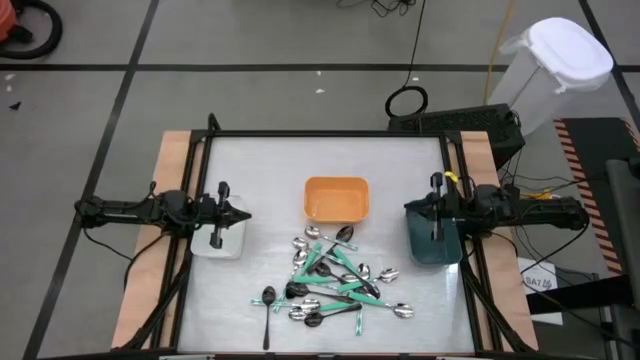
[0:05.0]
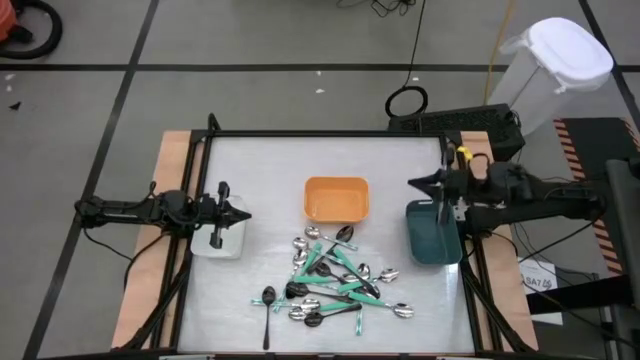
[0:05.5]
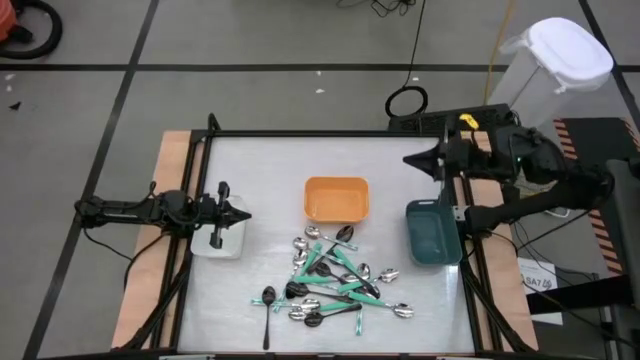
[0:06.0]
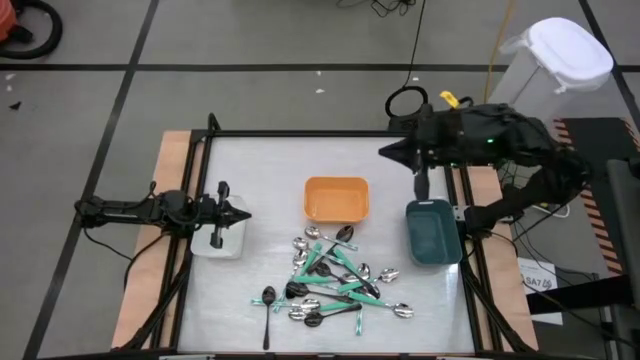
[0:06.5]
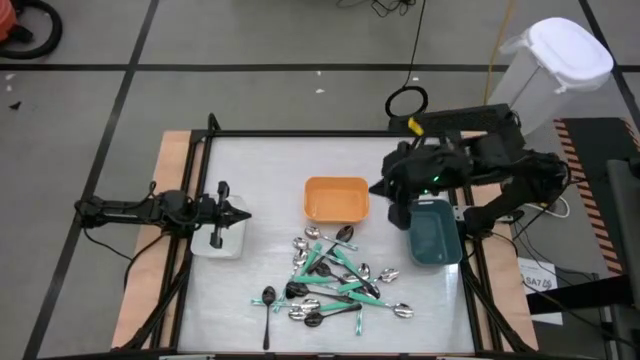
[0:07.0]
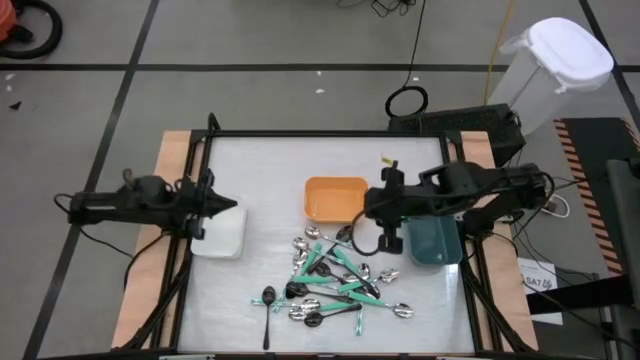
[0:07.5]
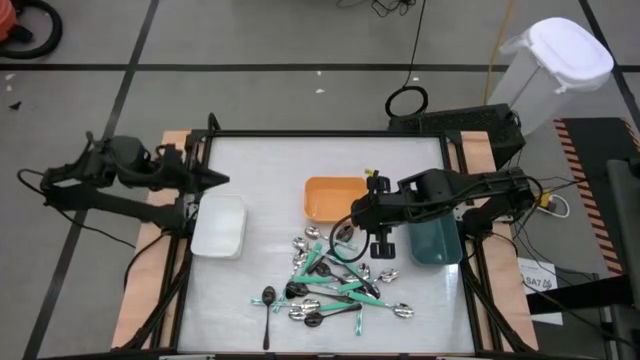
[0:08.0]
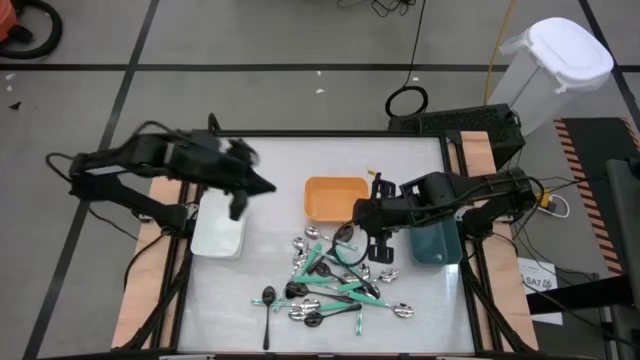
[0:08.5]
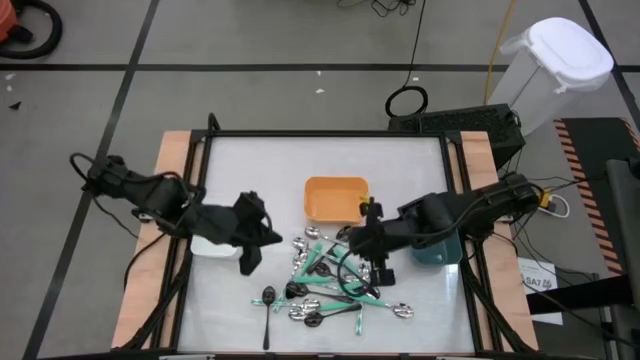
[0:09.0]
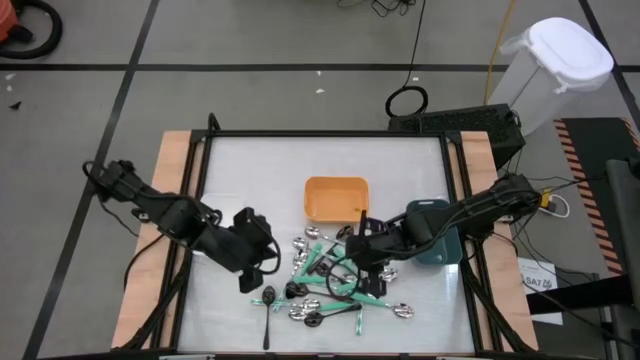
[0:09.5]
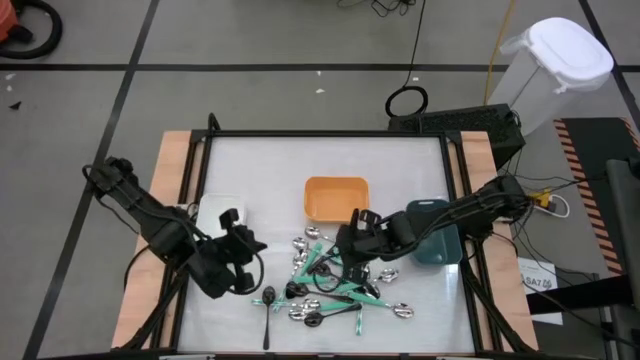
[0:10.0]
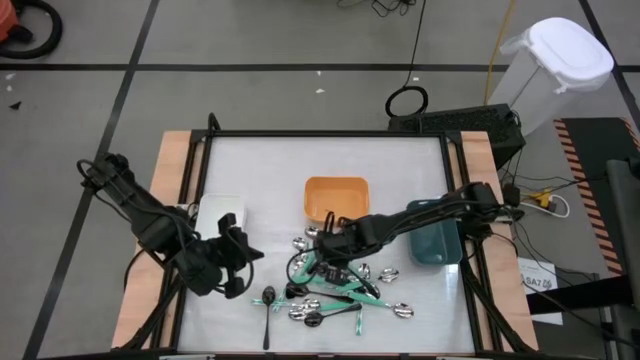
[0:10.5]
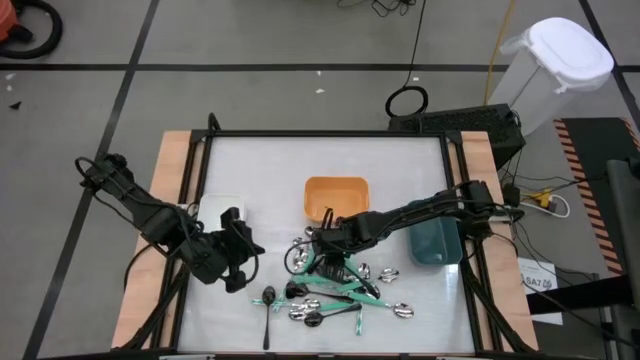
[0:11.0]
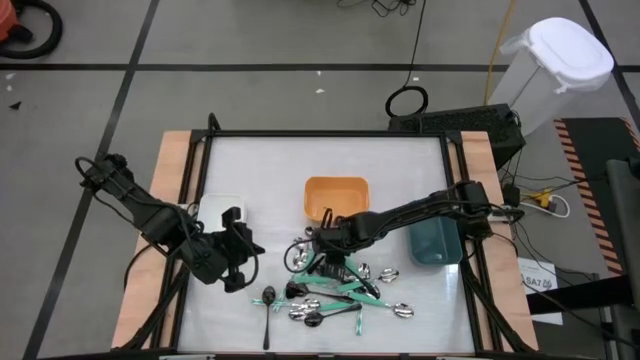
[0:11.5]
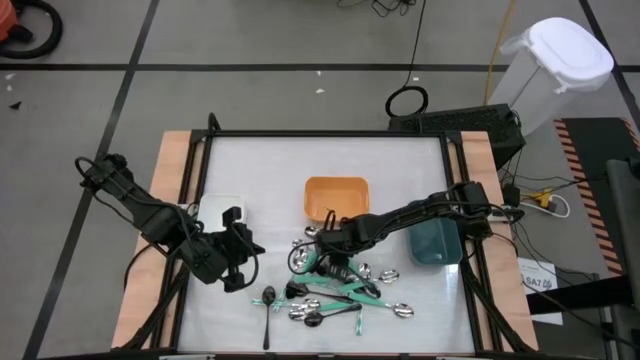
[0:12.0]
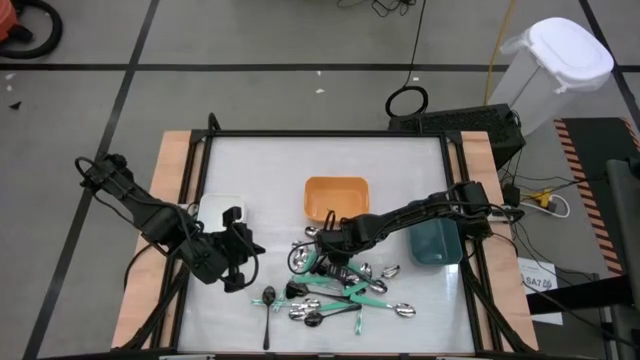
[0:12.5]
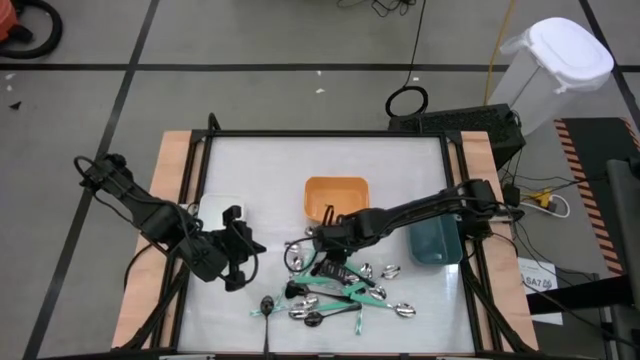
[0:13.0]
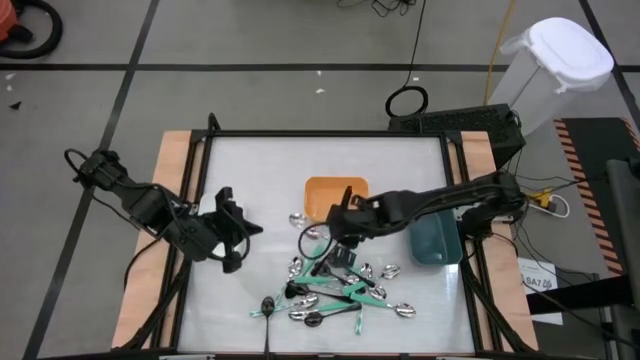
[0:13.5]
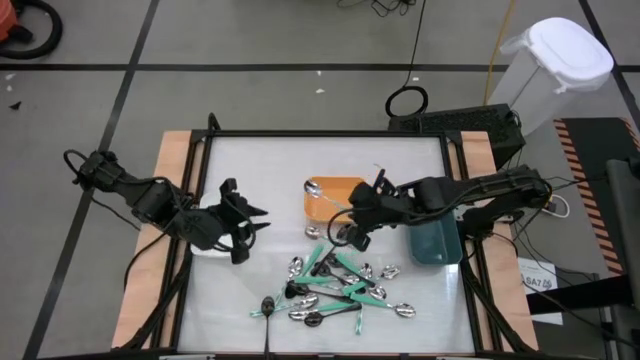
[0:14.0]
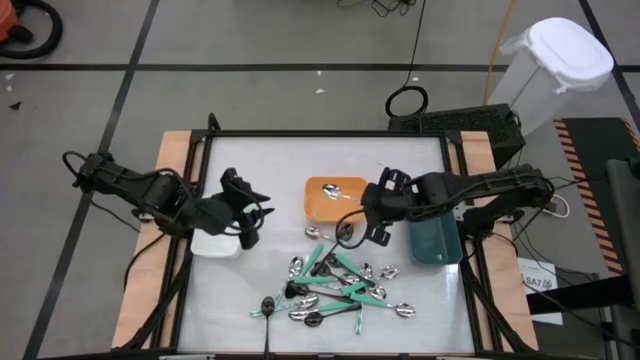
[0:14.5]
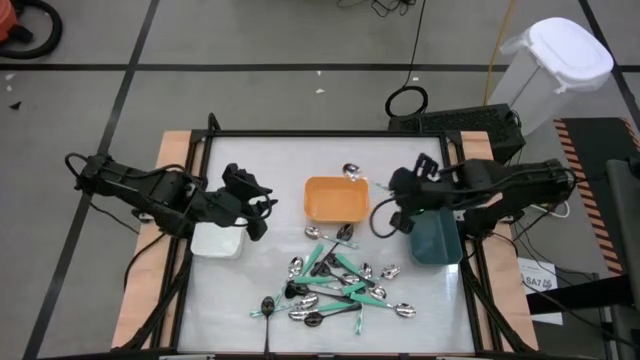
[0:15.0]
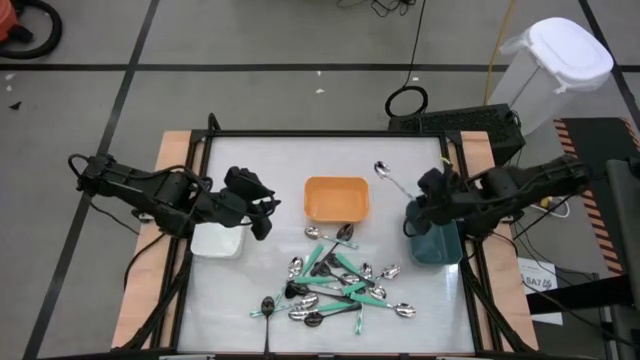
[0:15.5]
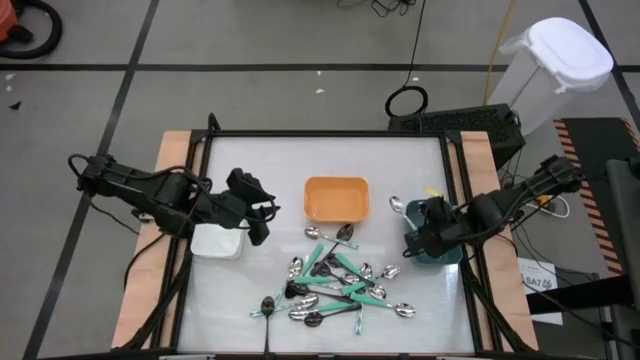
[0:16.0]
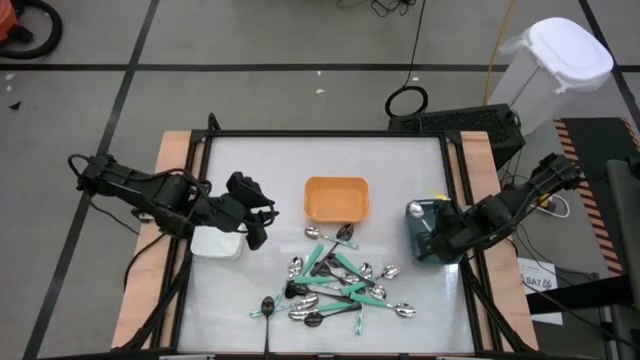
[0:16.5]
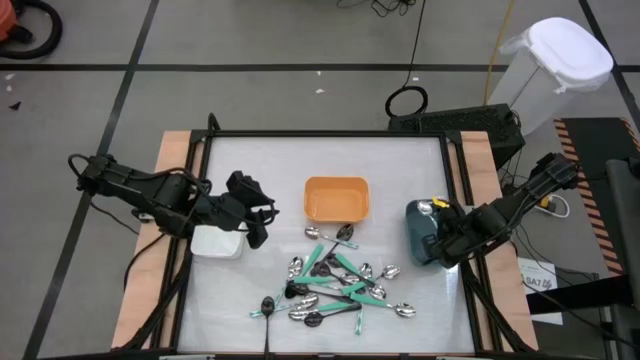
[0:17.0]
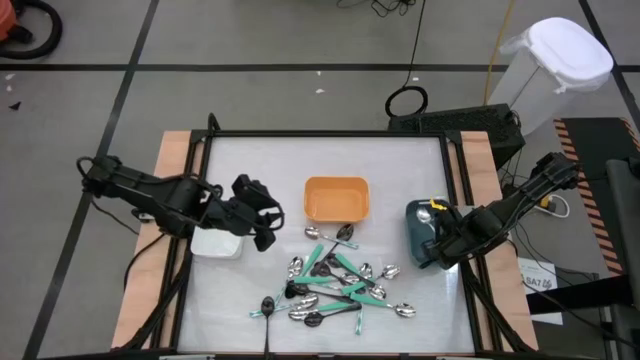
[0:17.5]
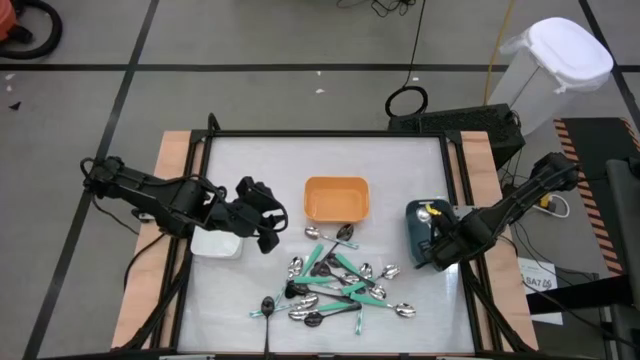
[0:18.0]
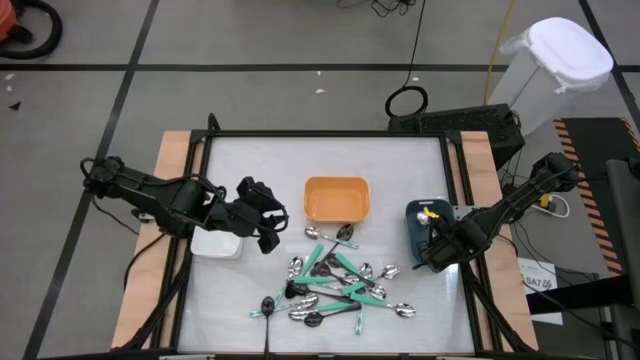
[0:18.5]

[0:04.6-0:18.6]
Task: Sort silverware by color (type)
Put the white spoon into the blue bin
